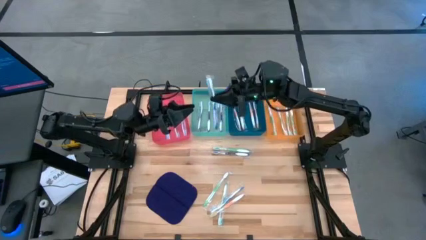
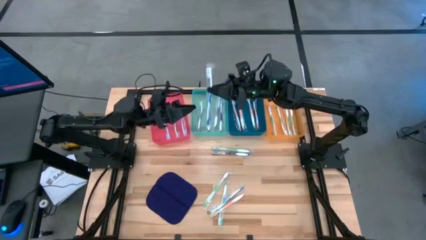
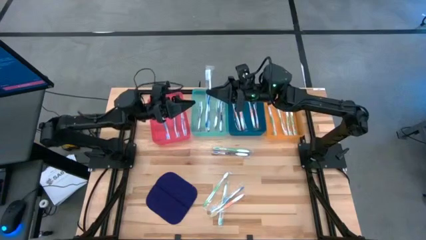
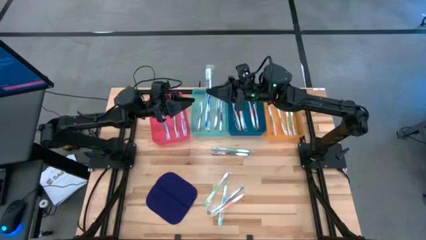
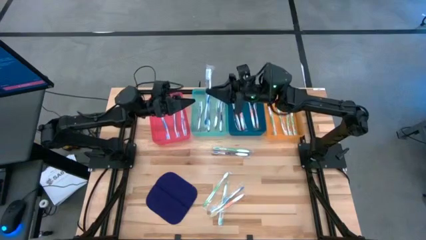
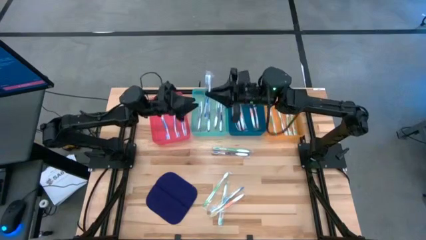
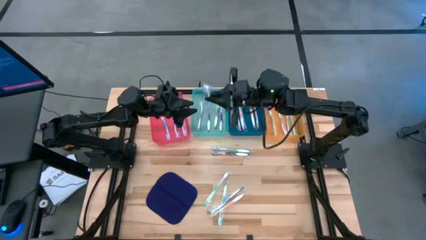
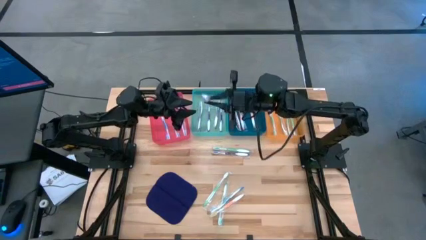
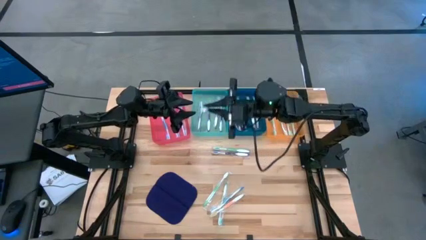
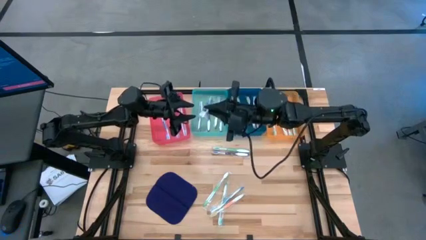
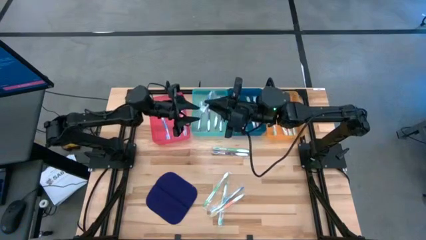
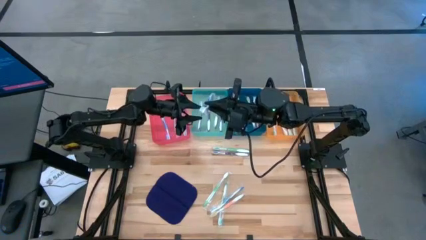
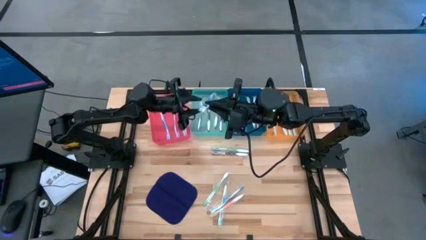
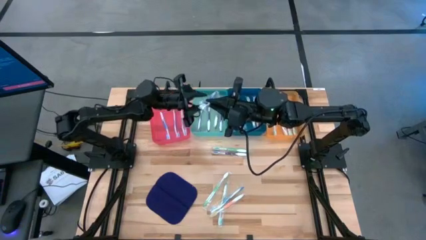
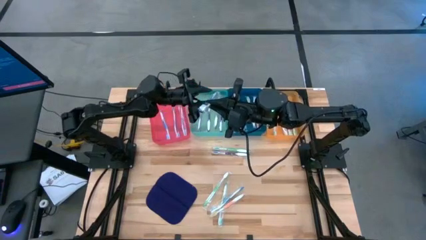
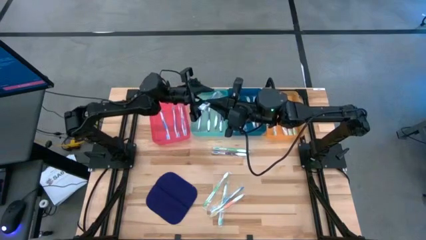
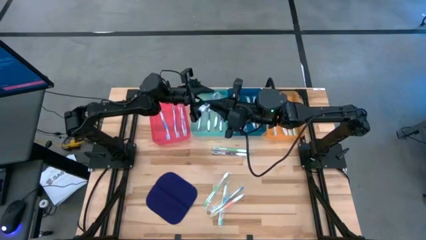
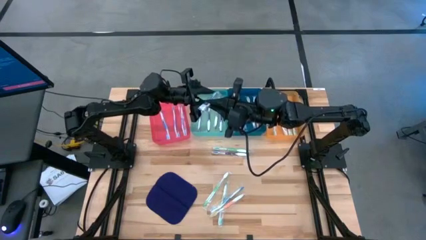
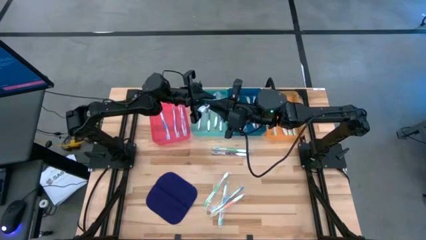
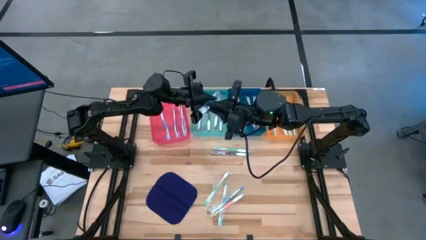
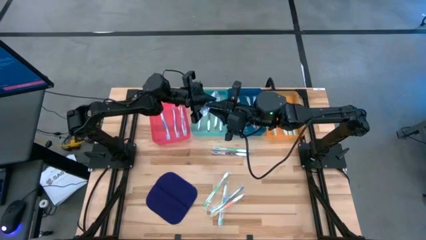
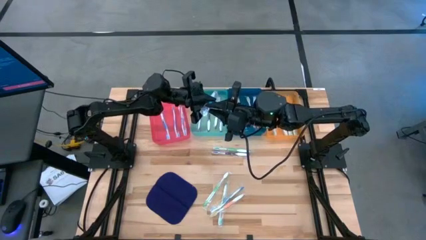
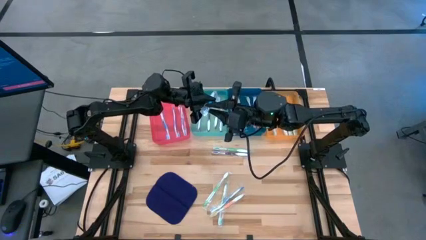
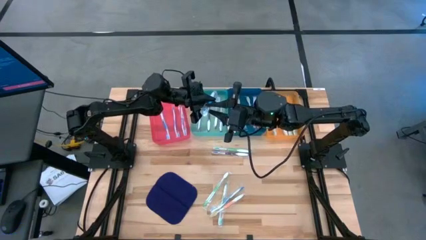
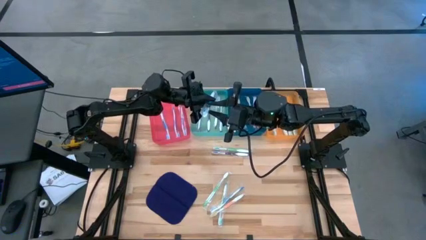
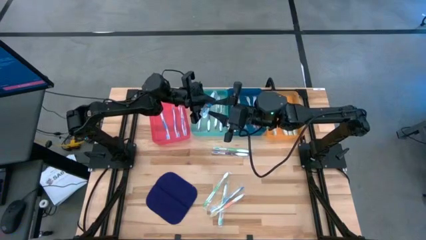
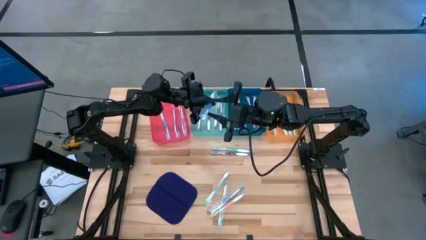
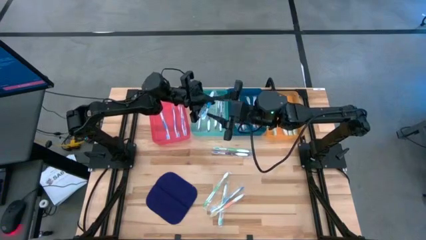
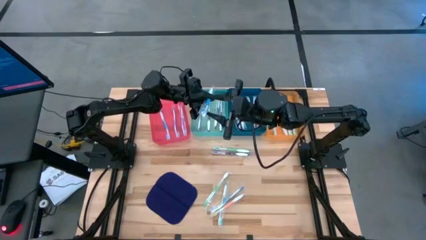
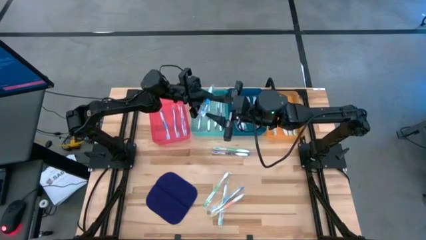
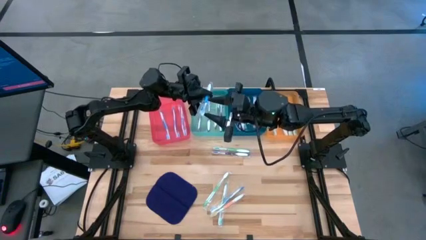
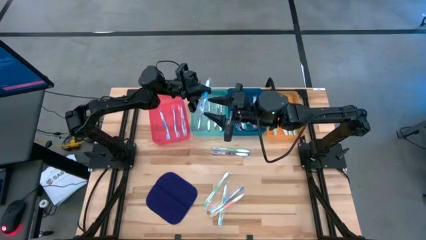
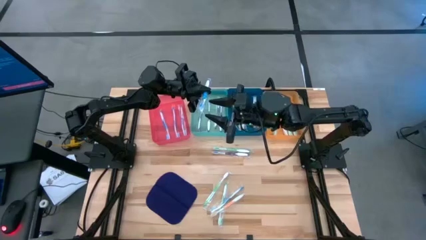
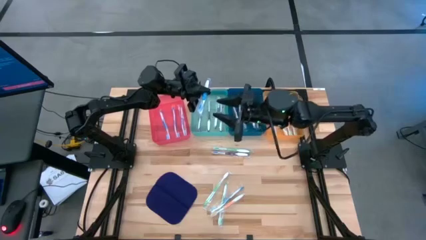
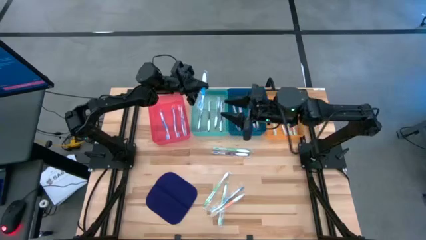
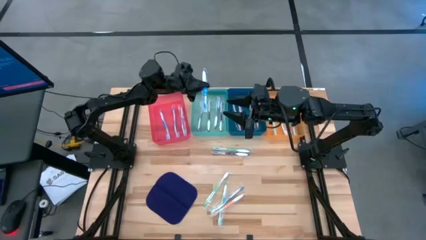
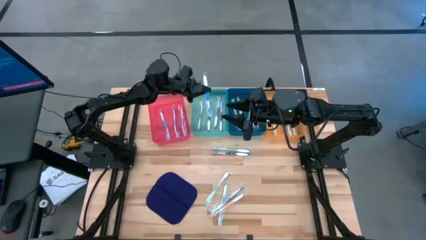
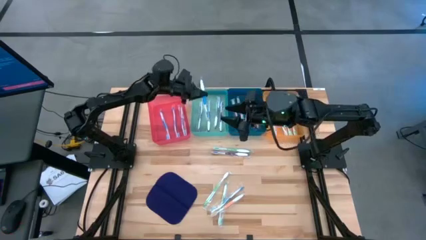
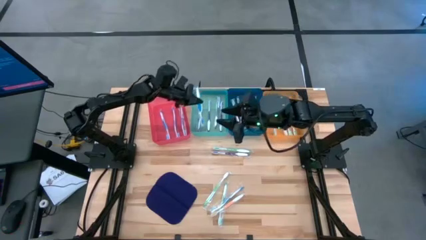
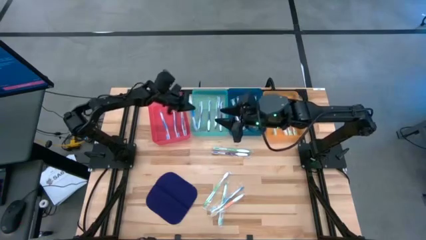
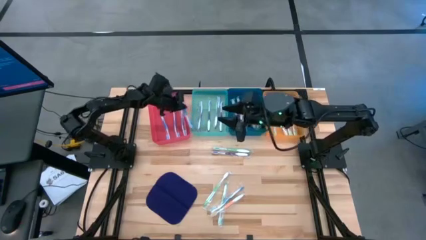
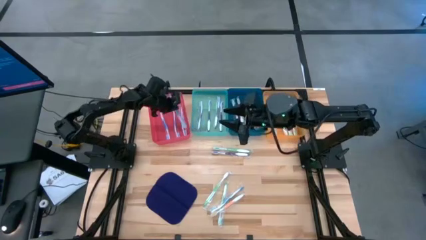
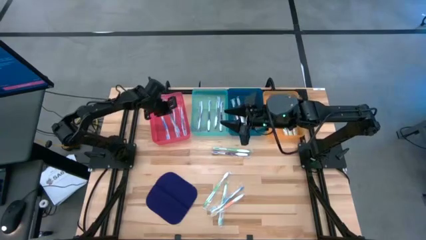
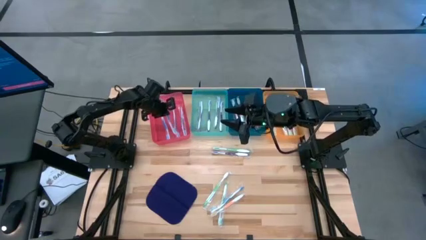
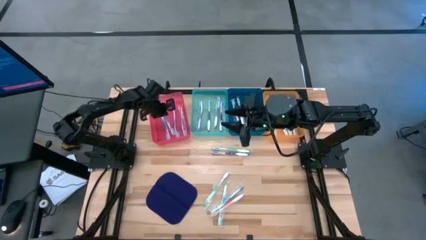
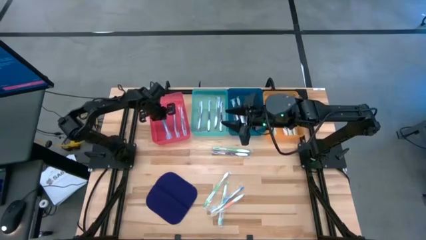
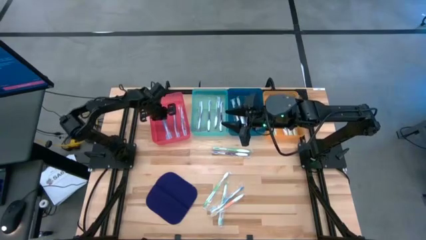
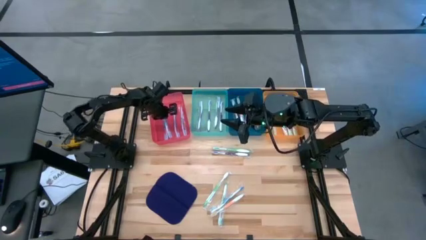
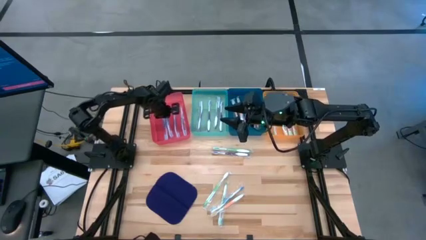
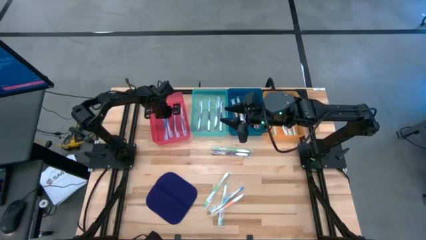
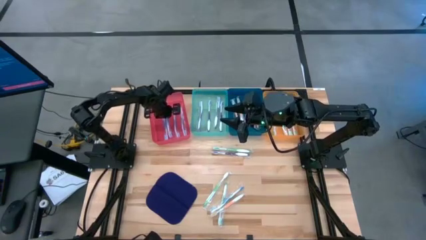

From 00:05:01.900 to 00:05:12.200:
Task: Pick & Place Toothbrushes
Put the blue toothbrush into the red bin

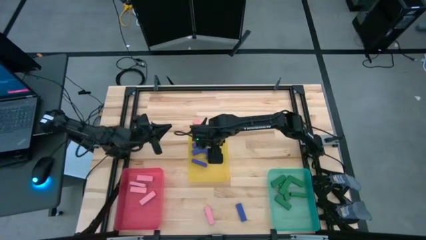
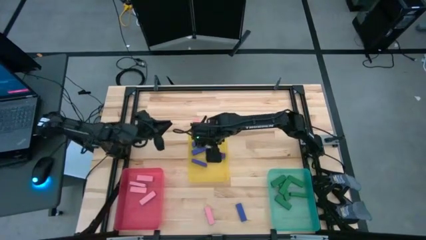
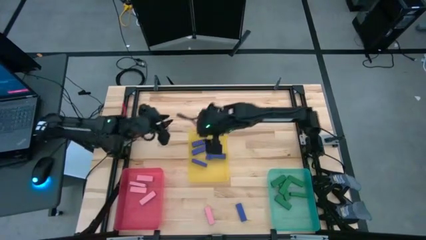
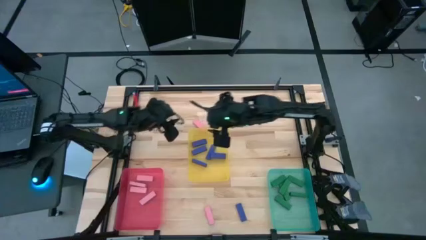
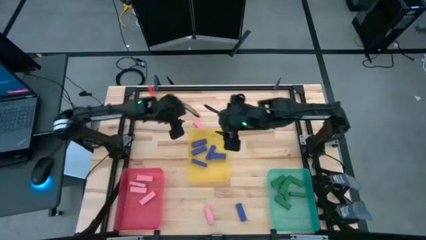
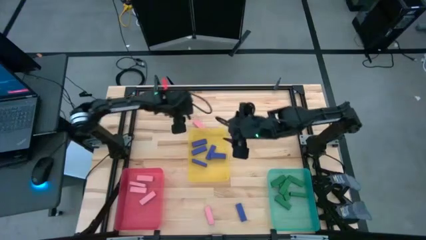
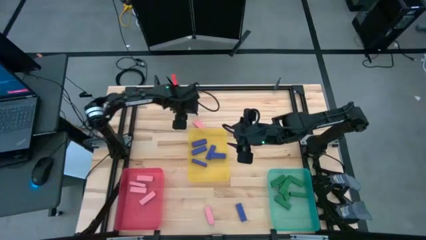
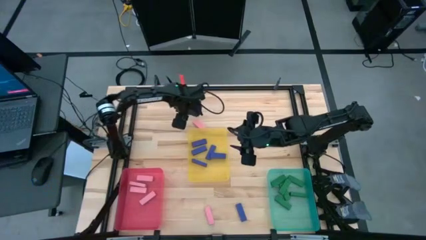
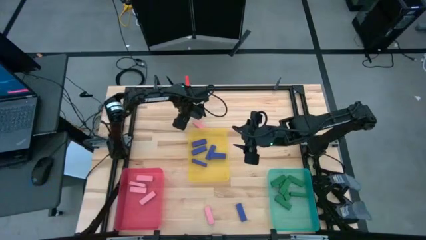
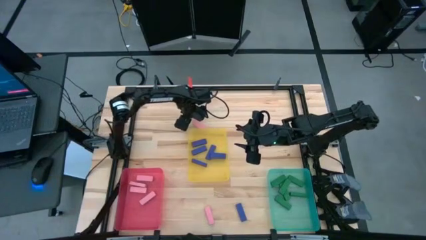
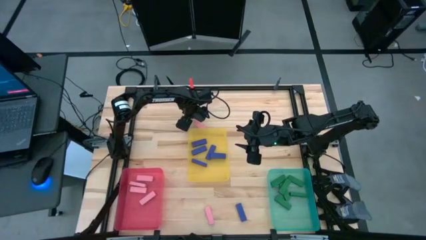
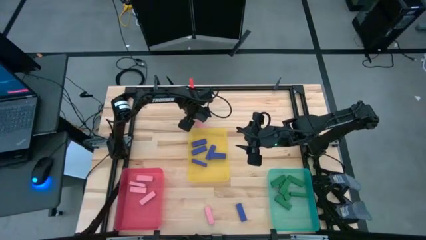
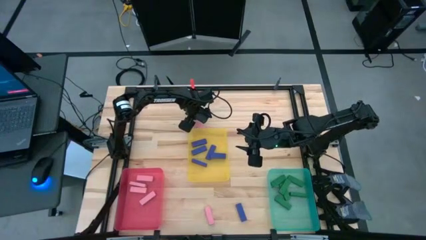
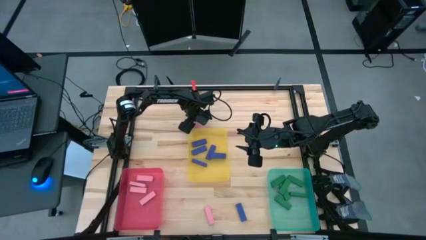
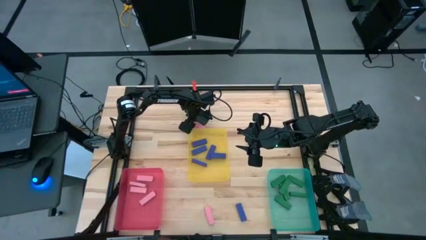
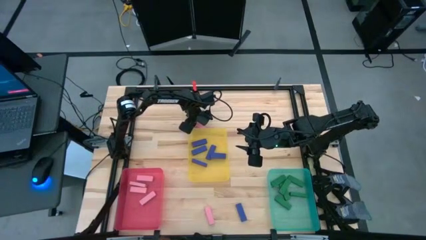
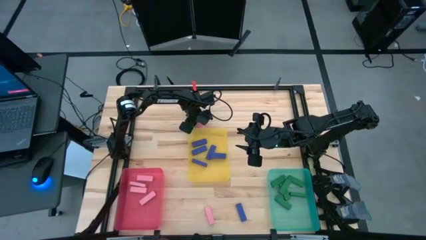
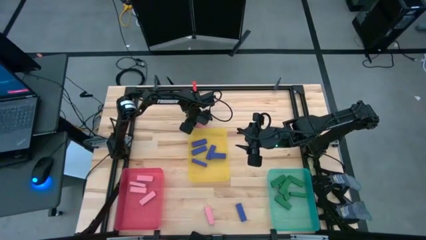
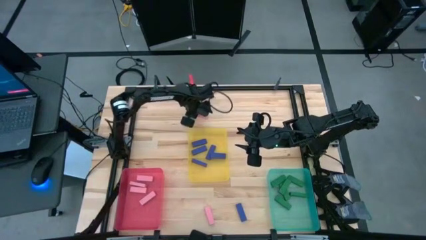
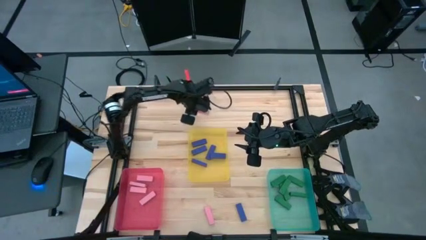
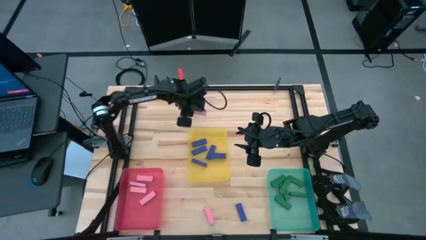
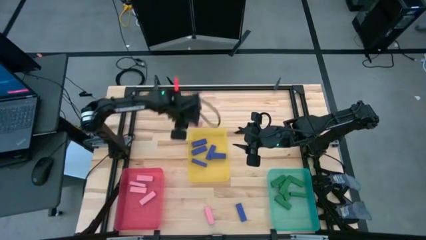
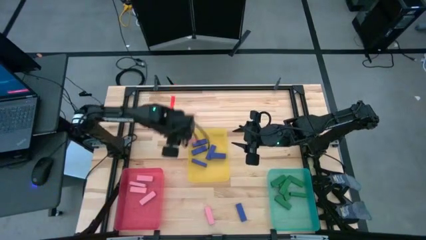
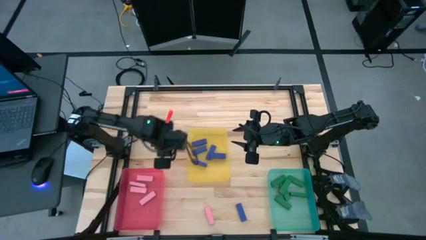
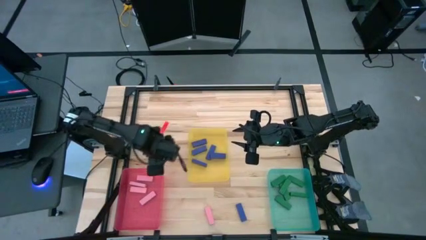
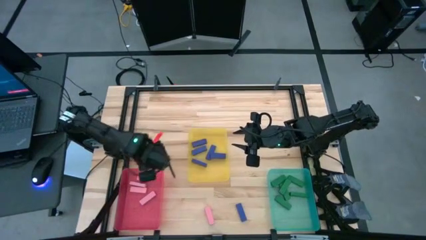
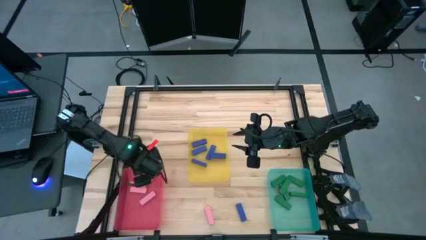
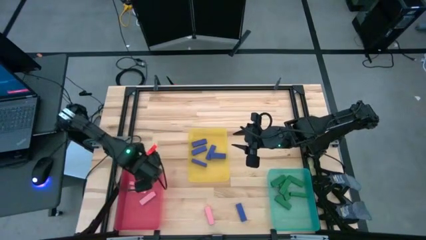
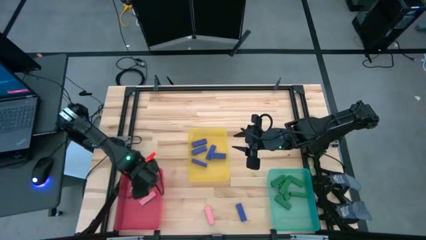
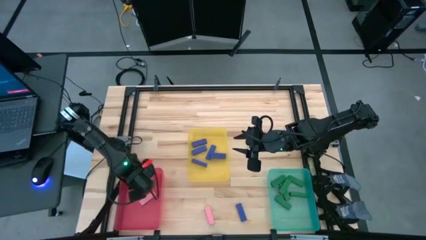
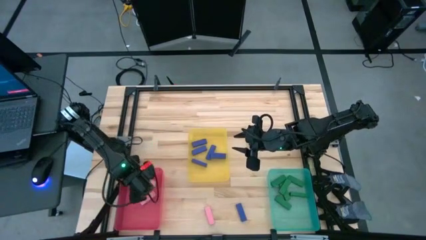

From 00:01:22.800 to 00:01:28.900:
Task: Sort blocks
Put the top pink block into the red bin
